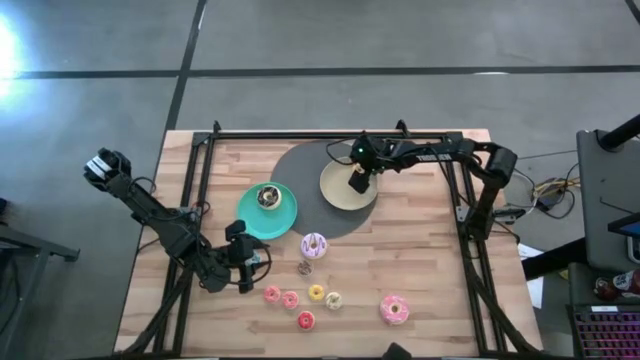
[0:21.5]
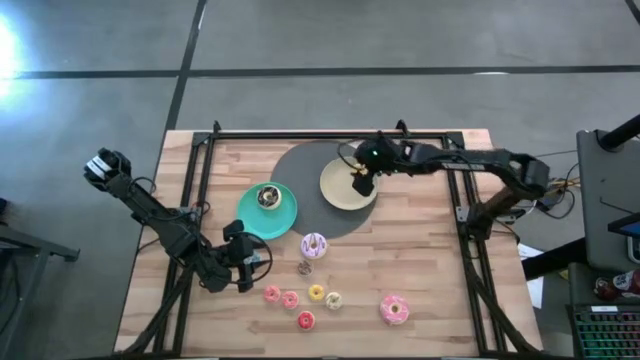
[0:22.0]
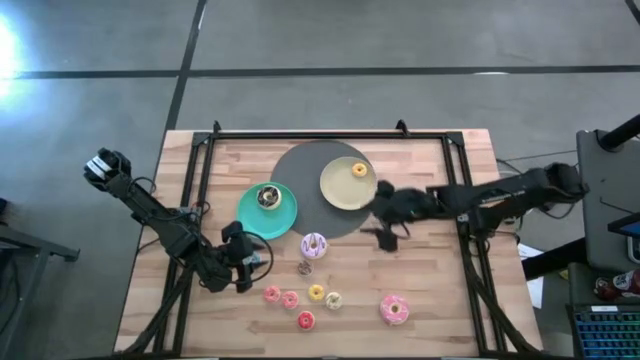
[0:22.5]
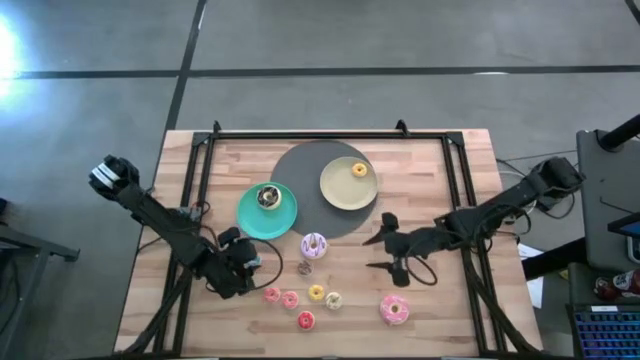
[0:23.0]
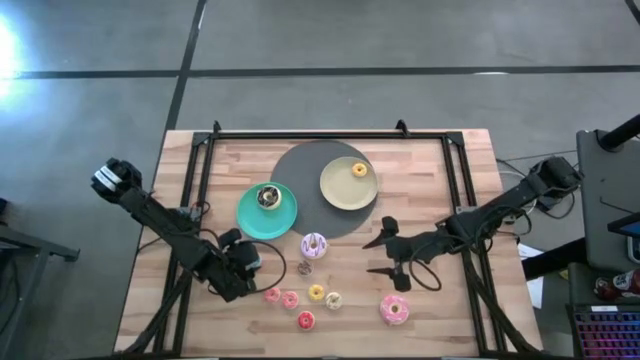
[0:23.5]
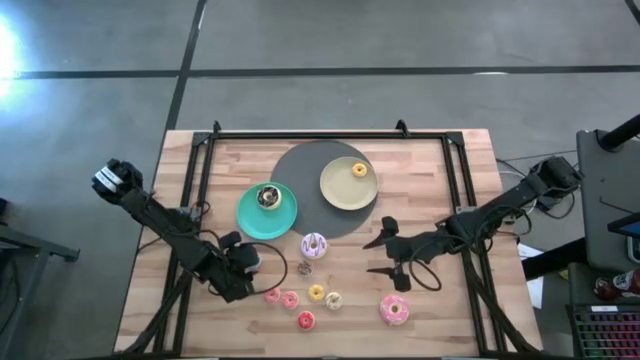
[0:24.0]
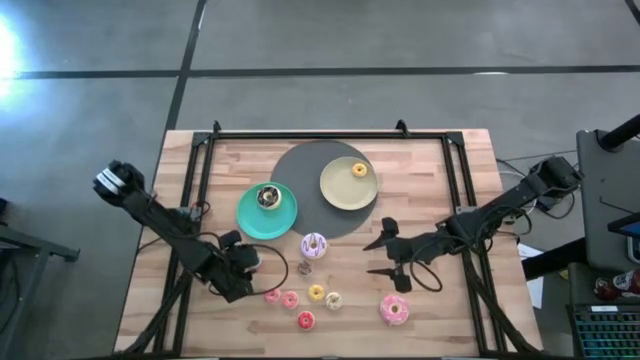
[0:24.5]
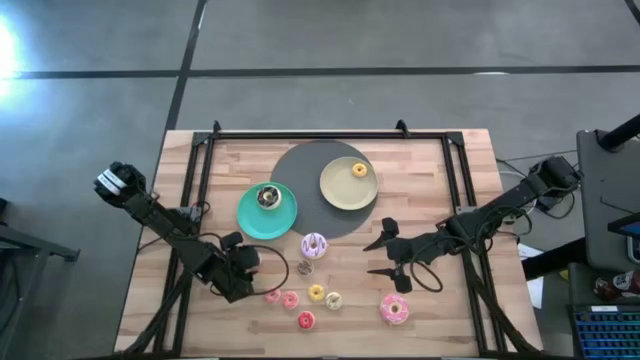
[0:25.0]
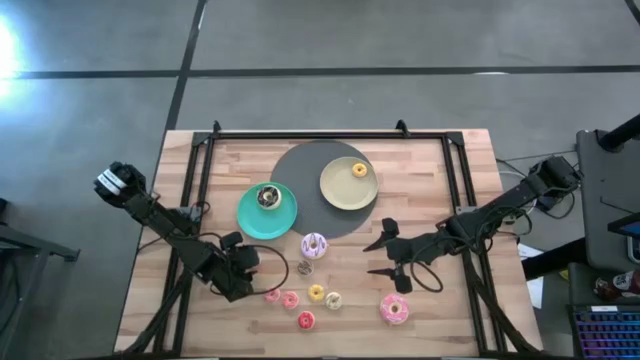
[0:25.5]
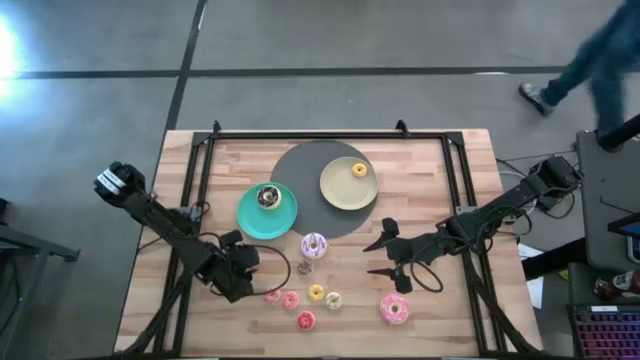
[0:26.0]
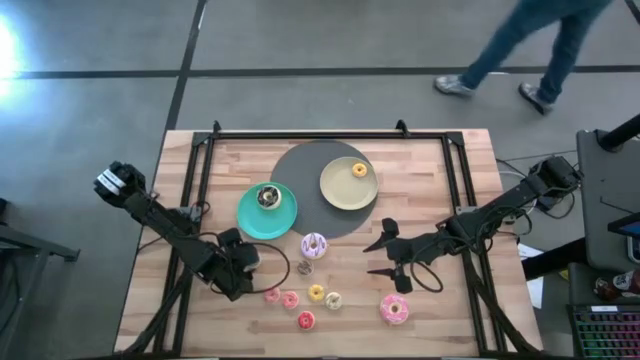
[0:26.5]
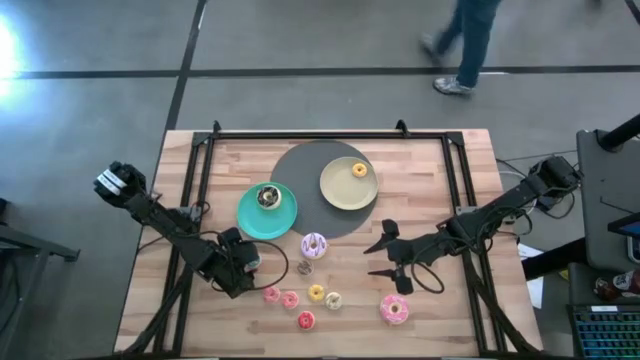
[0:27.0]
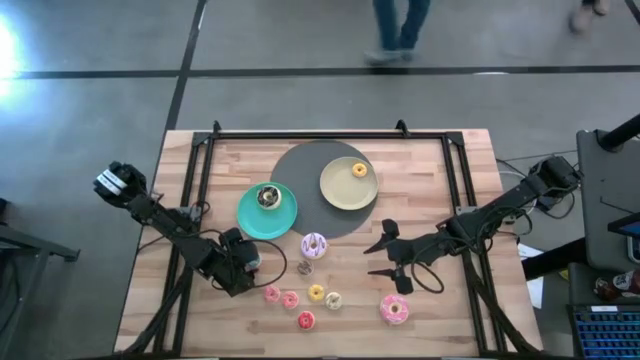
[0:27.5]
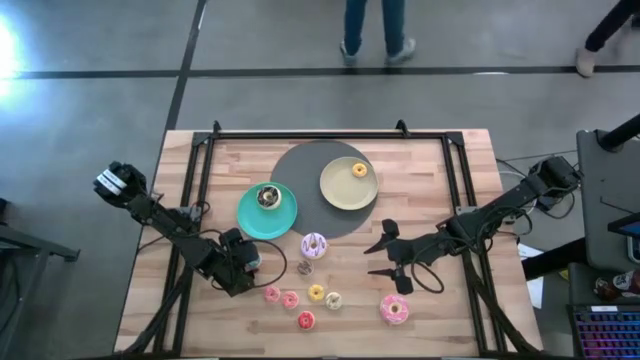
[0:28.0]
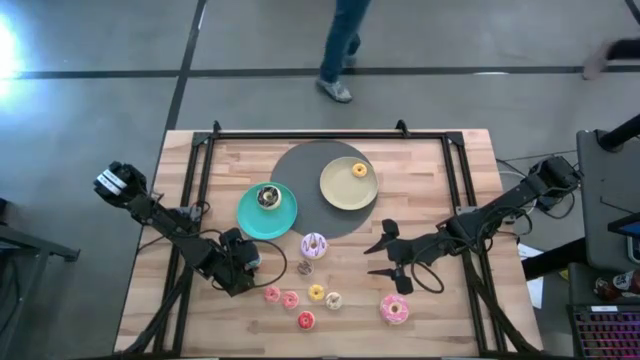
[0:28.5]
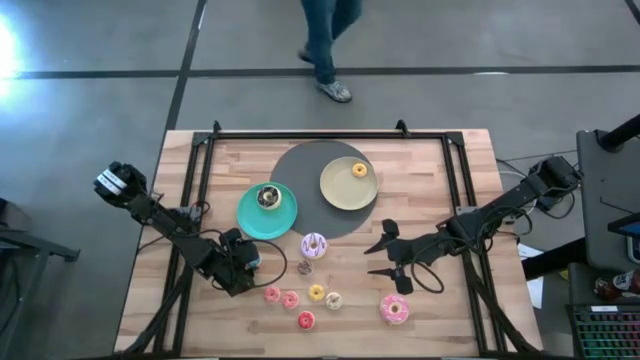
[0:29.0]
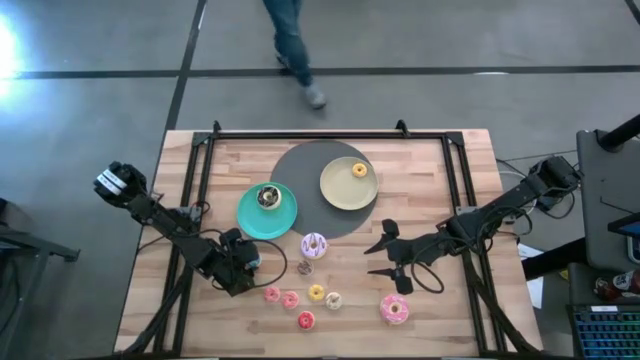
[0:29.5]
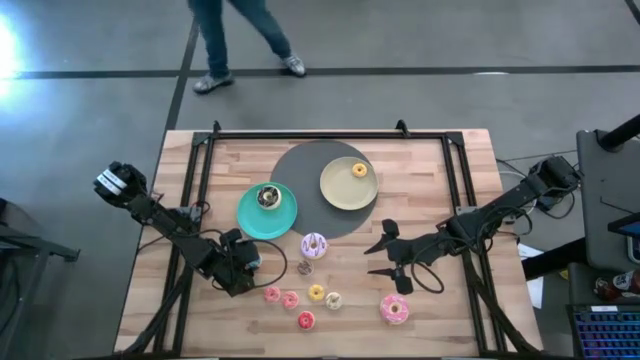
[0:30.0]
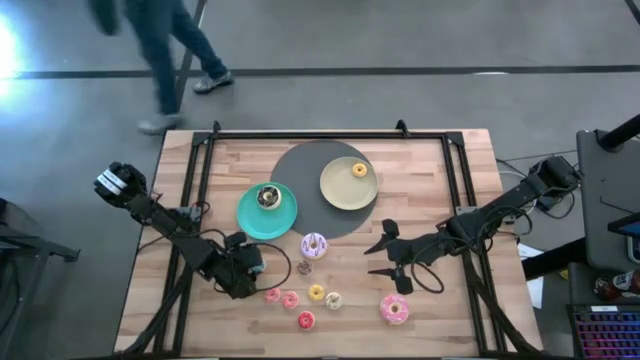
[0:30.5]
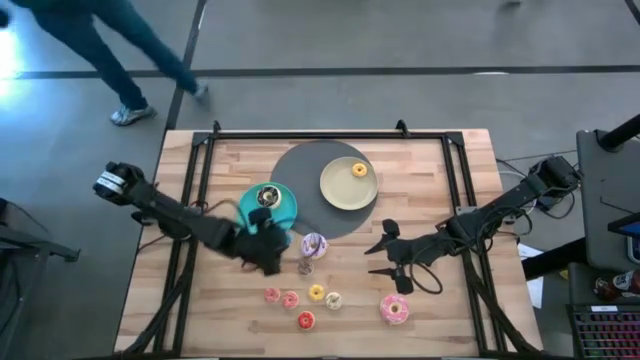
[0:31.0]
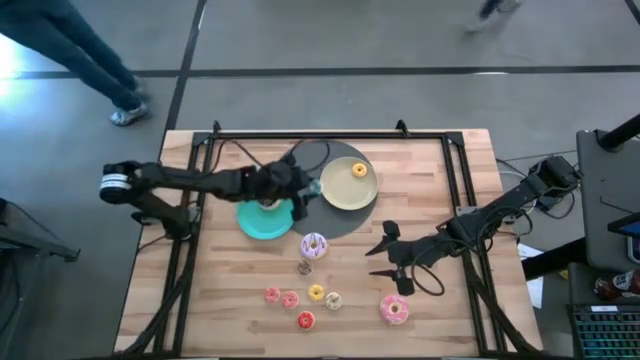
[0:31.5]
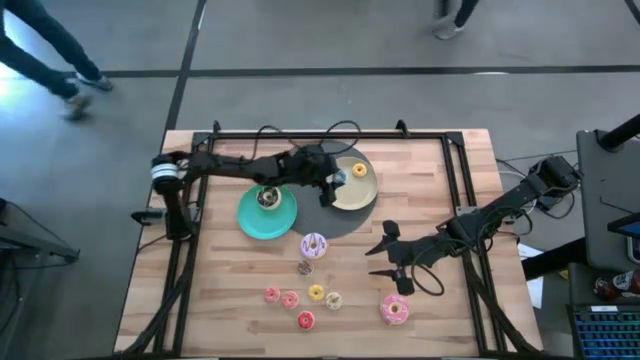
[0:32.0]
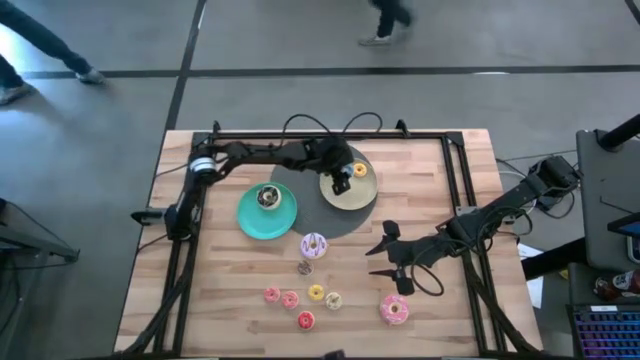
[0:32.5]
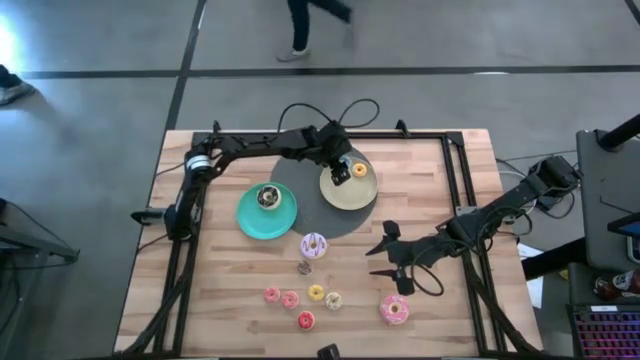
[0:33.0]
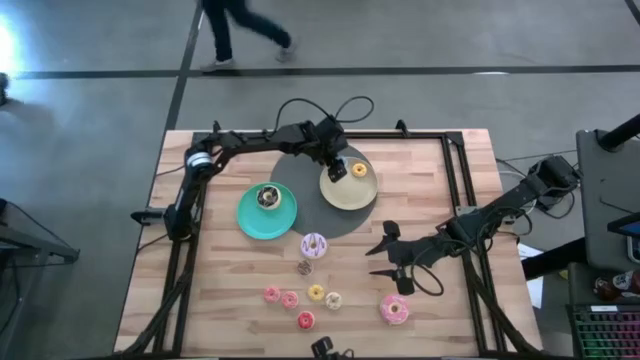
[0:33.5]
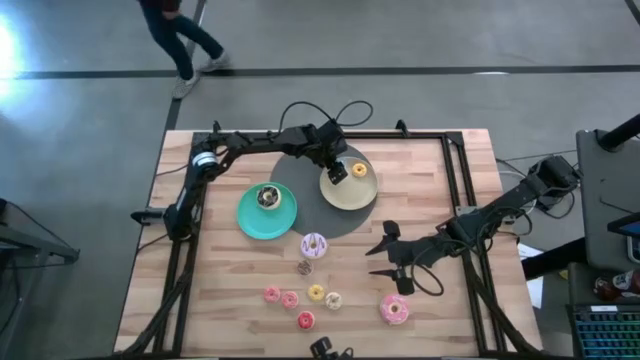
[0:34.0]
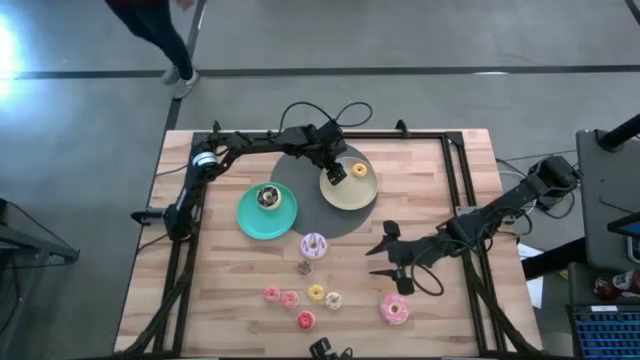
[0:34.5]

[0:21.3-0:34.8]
Task: Pick & Place donuts
Put the small blue donut on the brown plate

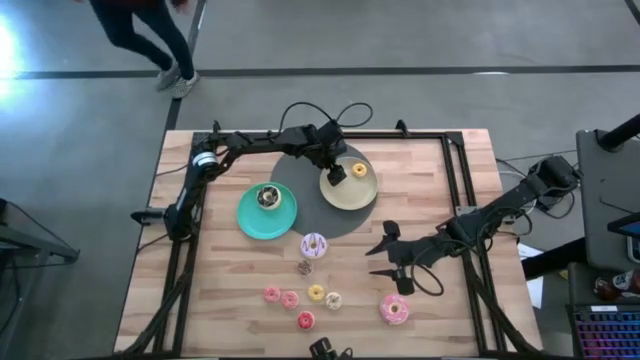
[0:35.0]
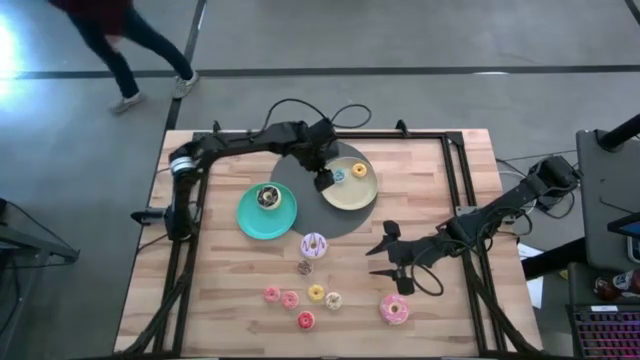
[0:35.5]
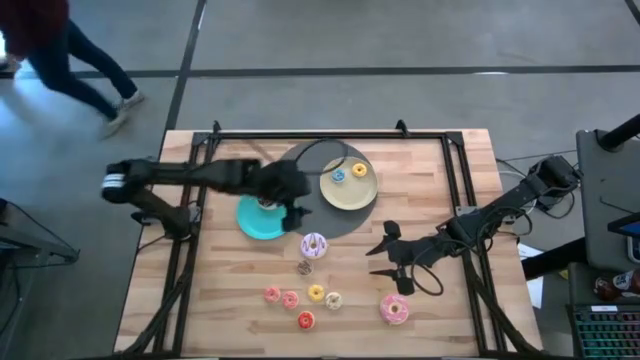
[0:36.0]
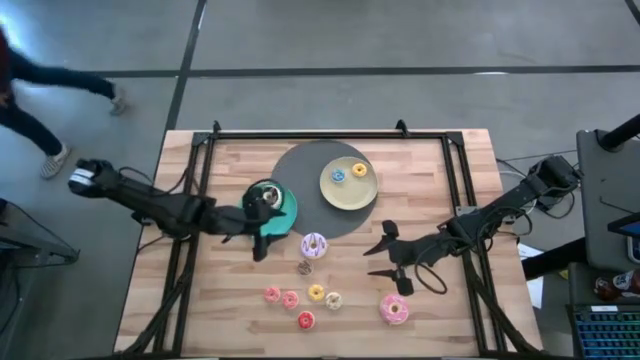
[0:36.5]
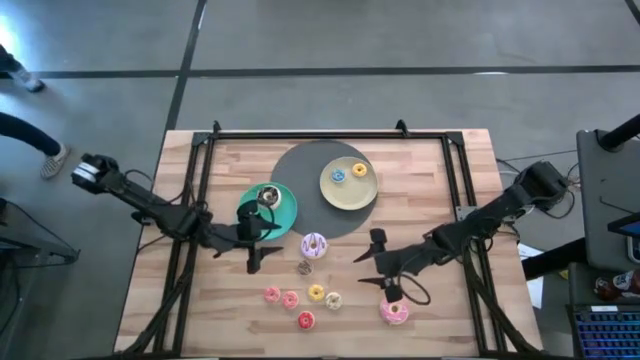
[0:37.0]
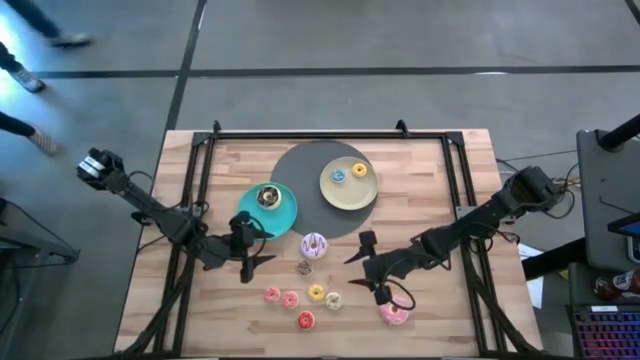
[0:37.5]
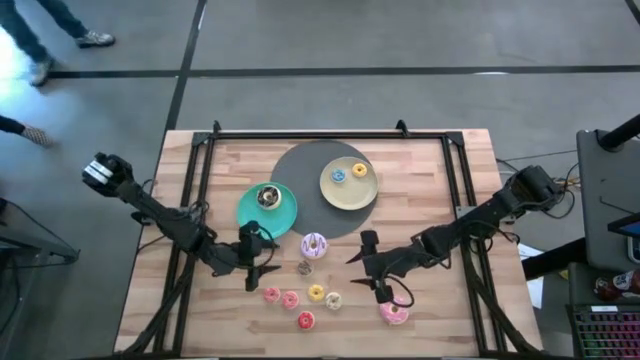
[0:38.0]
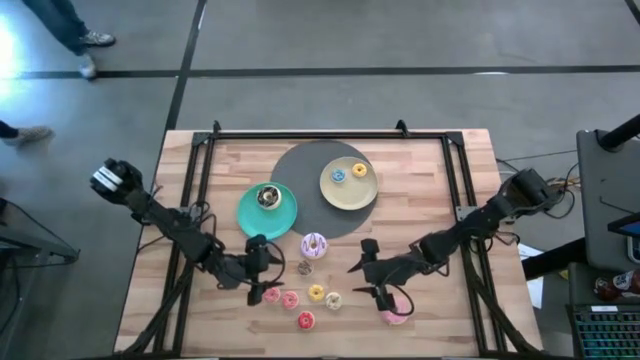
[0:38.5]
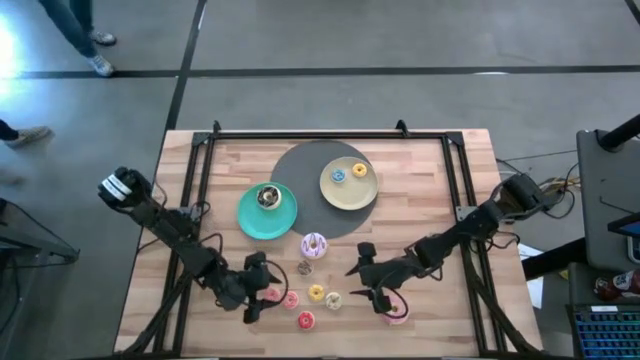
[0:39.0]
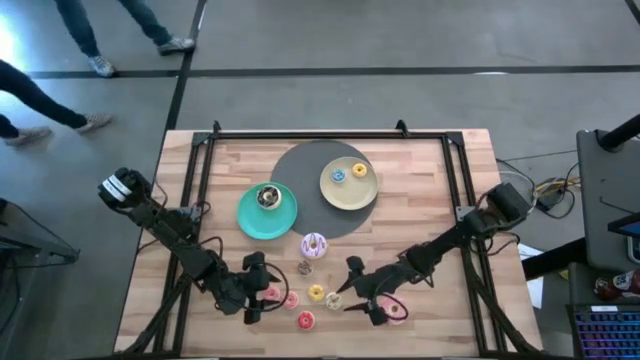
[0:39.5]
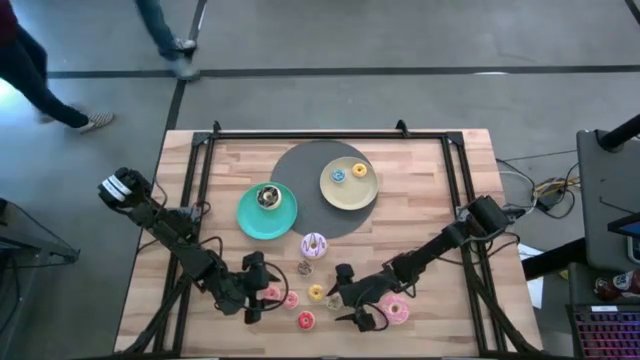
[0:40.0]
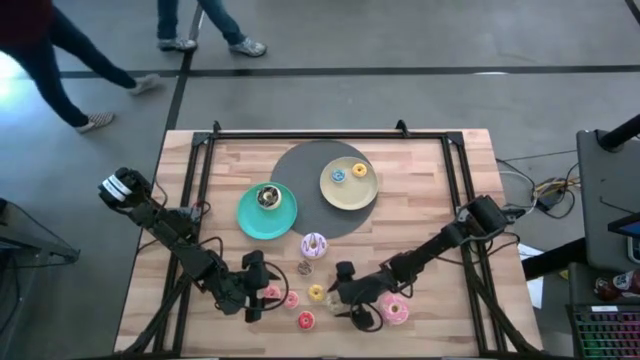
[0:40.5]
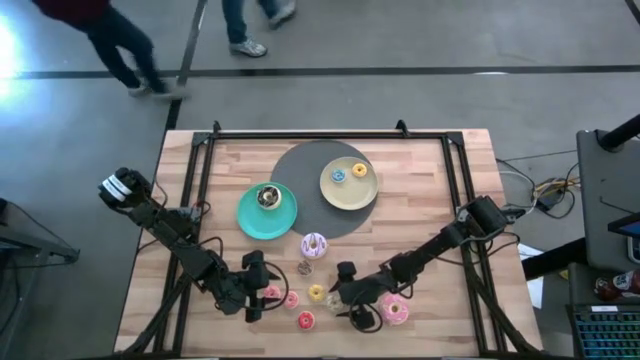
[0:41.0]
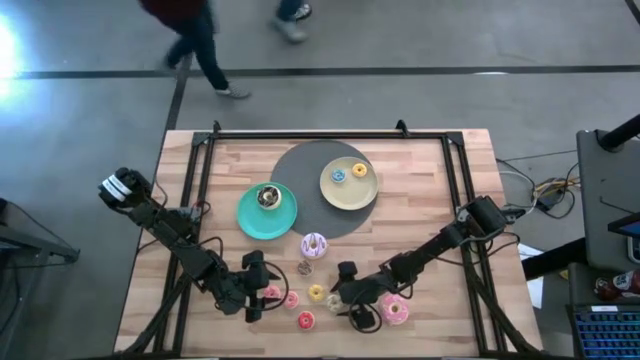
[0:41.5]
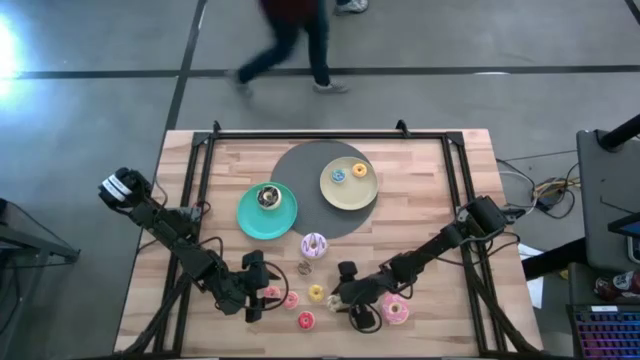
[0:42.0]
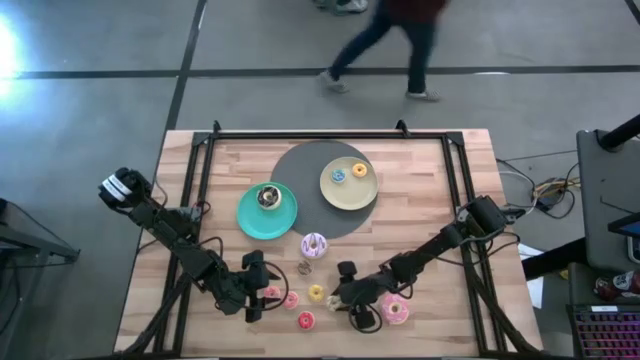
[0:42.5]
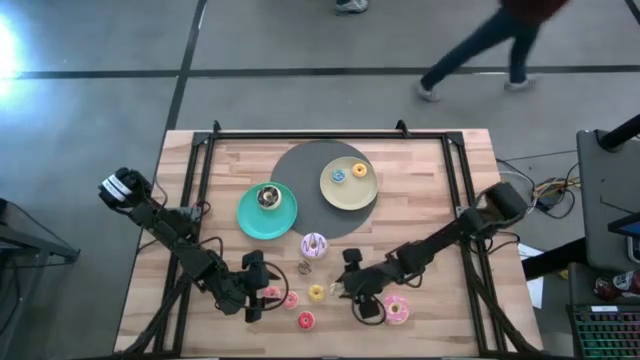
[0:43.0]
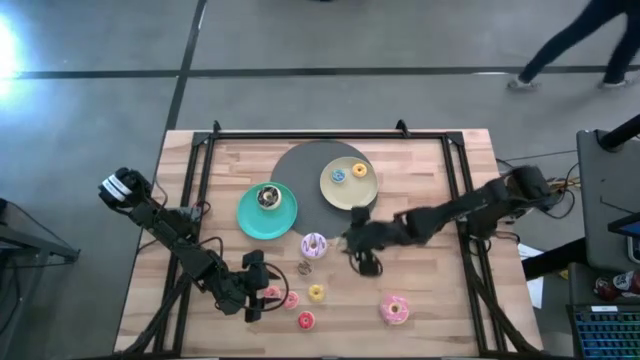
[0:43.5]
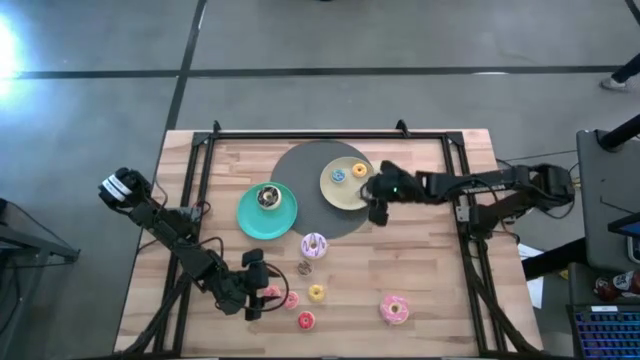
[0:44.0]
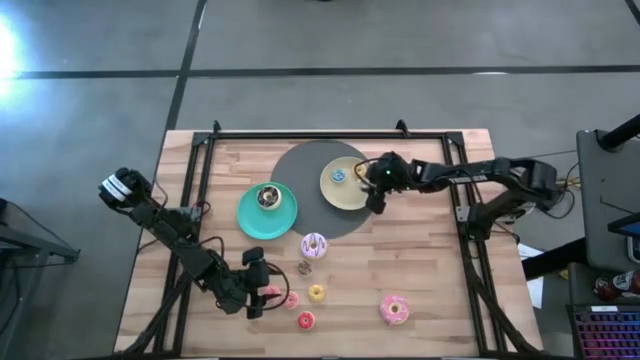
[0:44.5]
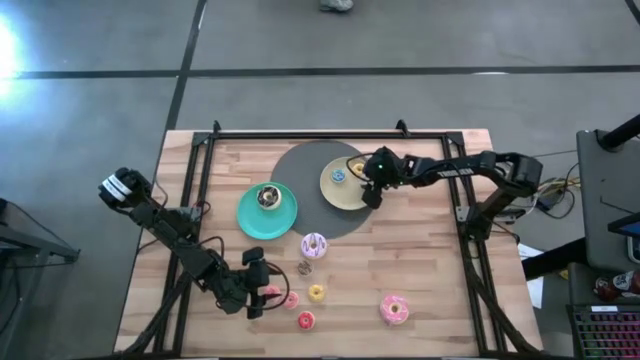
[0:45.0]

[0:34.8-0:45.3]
Put the small white donut on the brown plate
